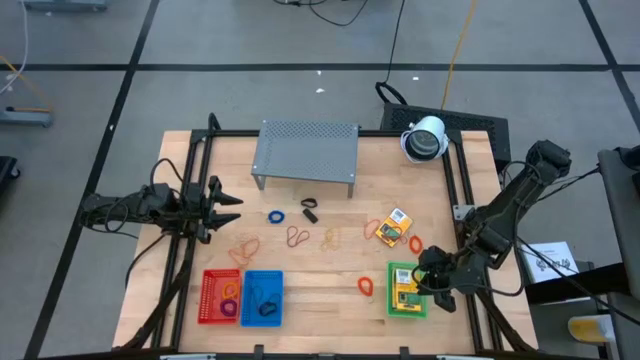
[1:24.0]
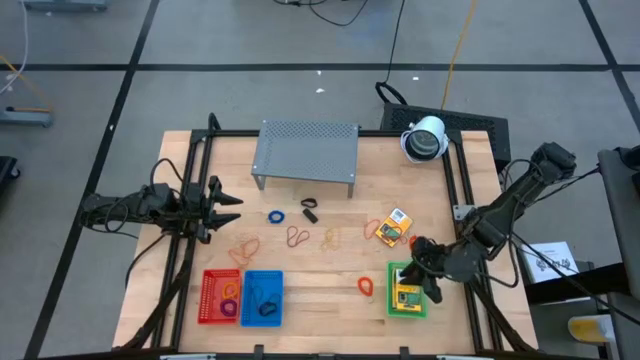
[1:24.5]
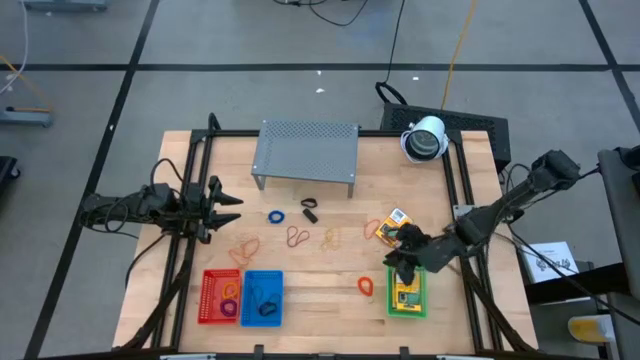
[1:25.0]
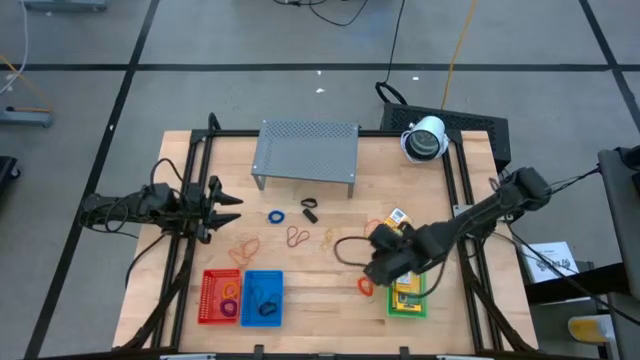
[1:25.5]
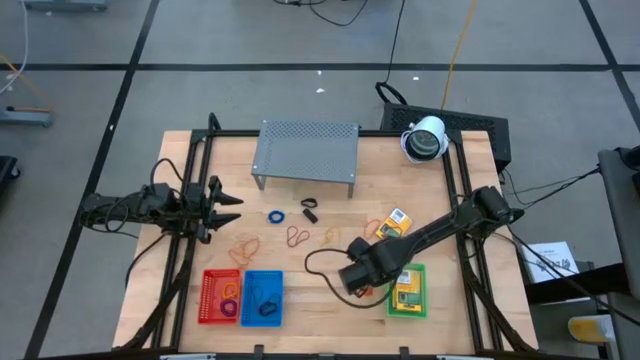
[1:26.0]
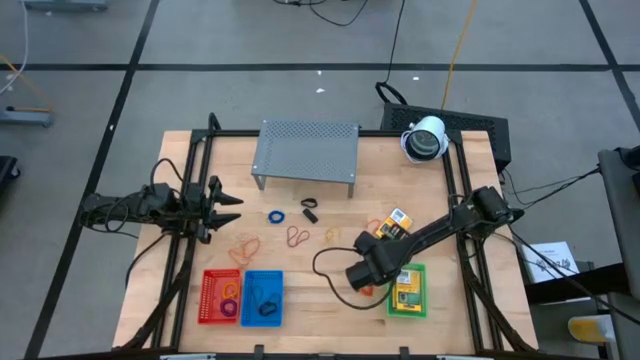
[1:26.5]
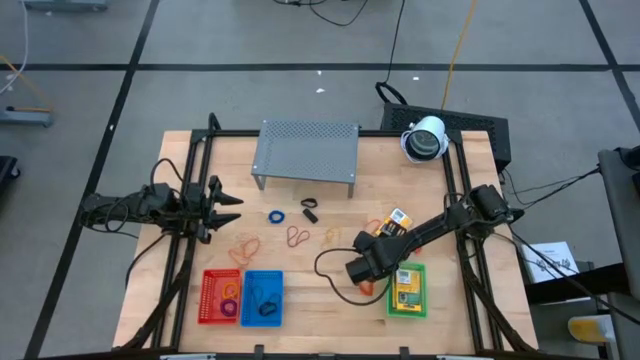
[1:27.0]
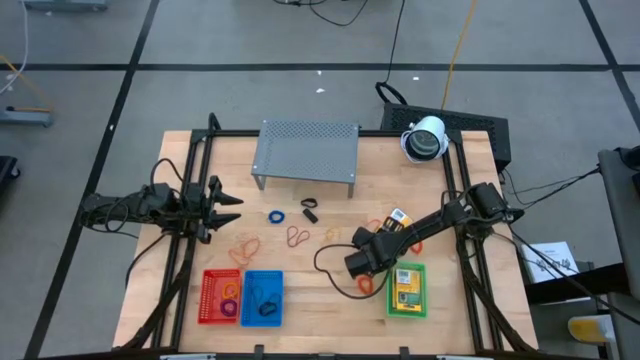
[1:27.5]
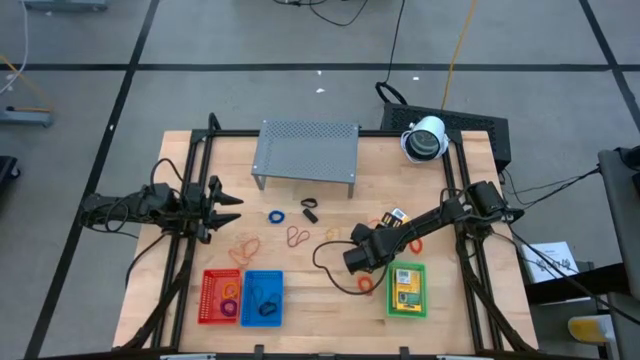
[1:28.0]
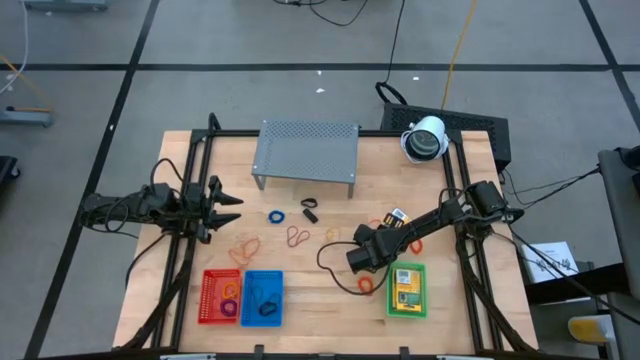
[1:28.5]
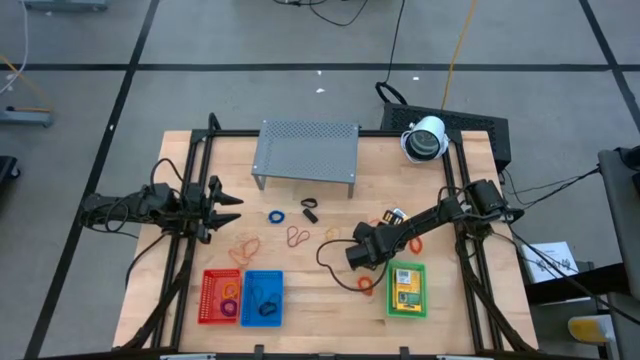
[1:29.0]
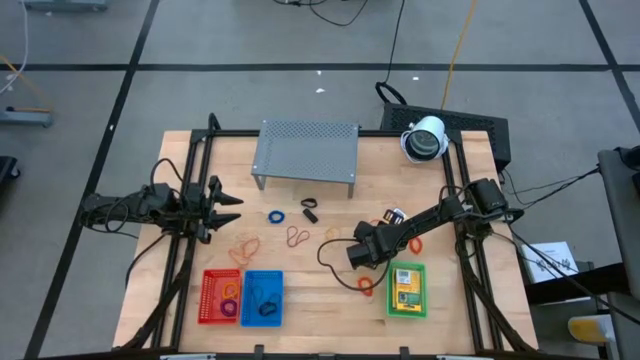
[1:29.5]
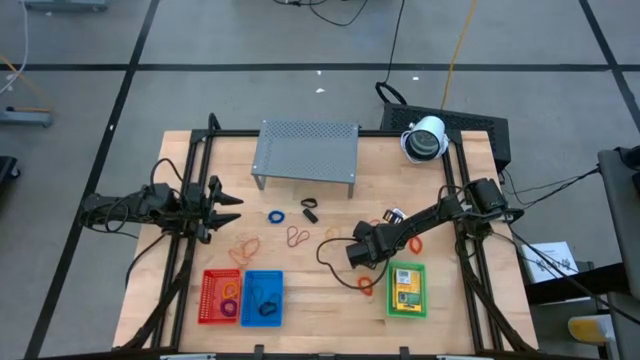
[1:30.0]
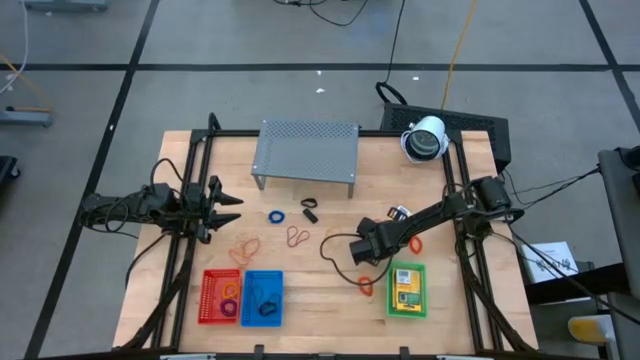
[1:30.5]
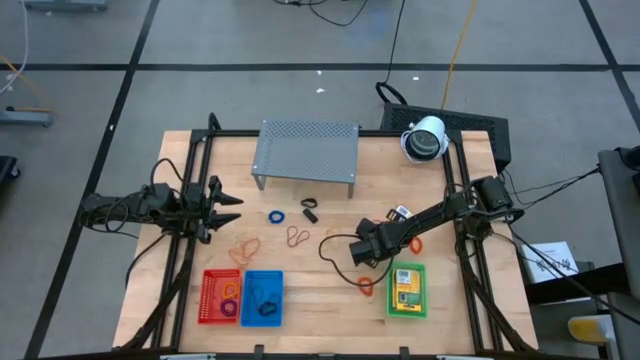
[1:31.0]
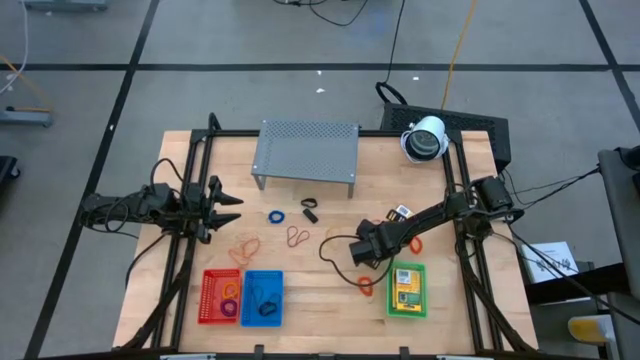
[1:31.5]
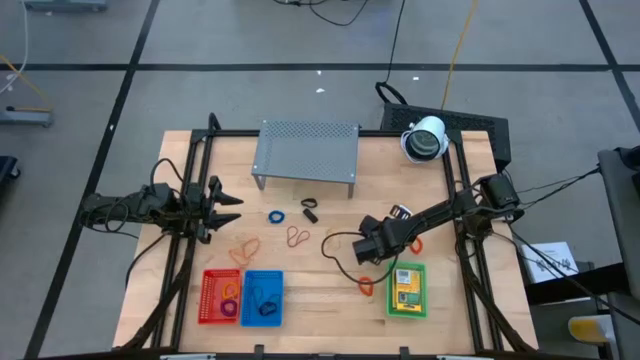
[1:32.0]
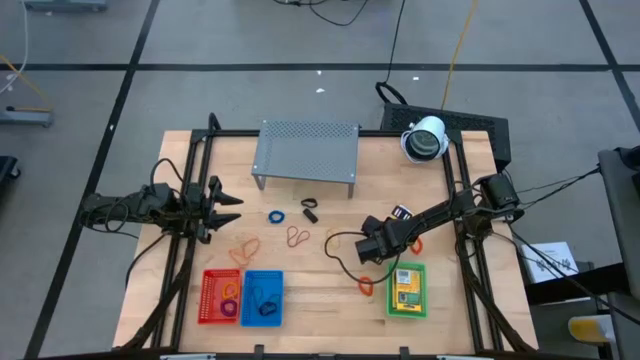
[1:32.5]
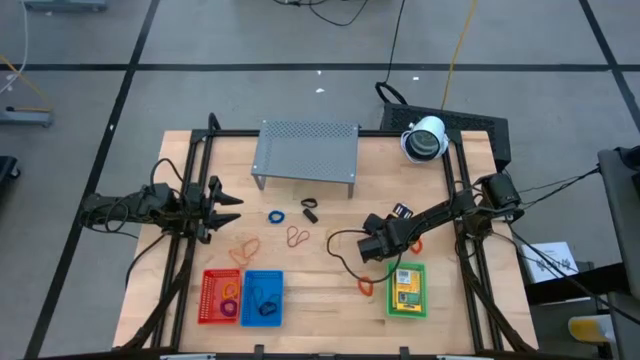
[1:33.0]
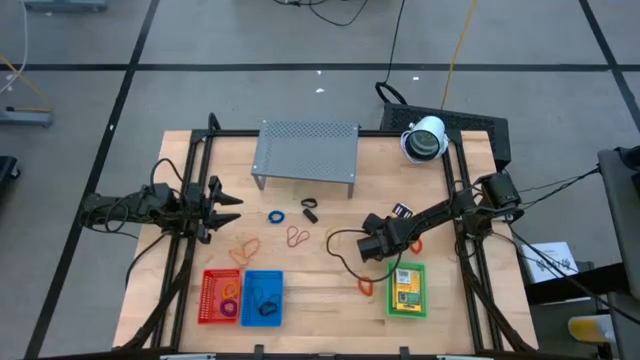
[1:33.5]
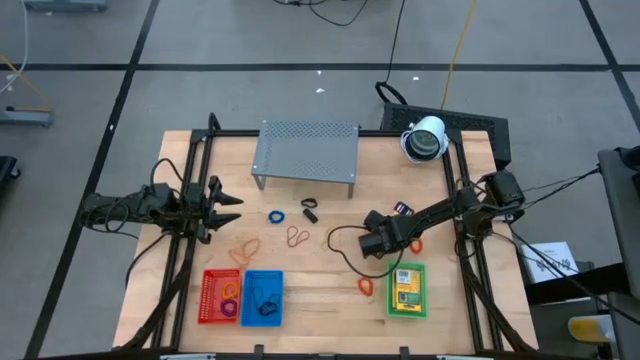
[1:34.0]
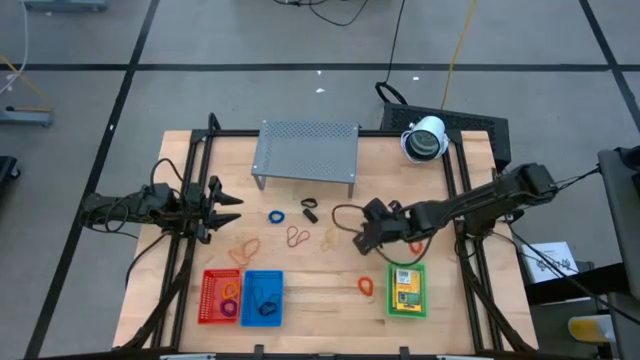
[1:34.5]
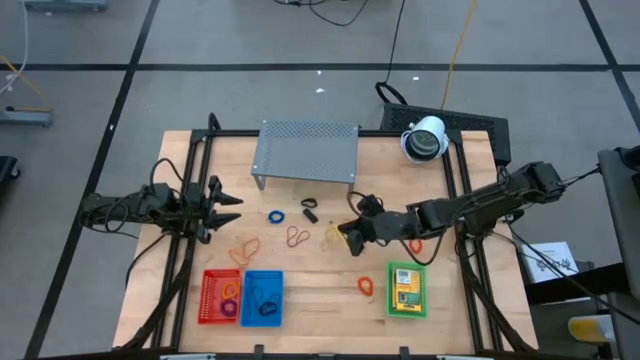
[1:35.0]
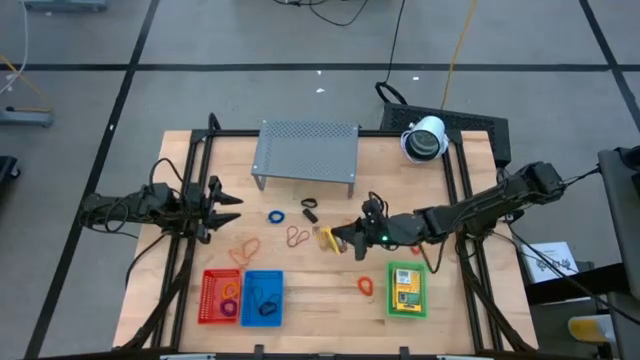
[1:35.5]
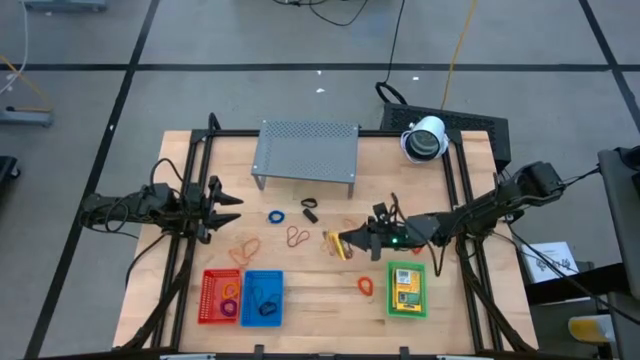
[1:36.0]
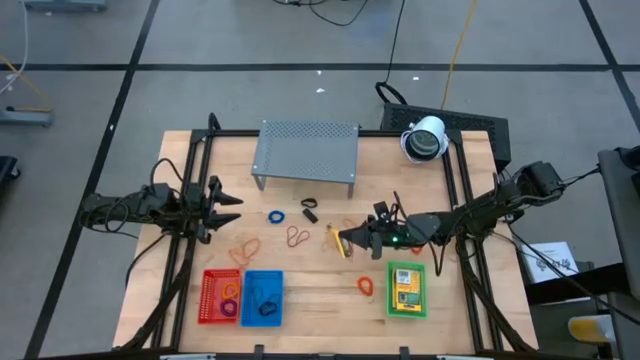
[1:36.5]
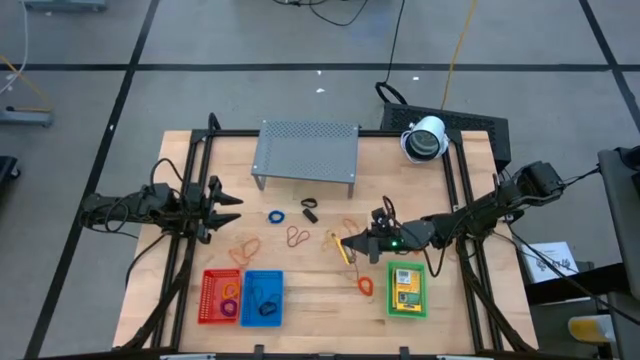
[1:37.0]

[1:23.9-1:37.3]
Task: Pick & Place Office Desk Supplies
Put the yellow crayon box into the green bin

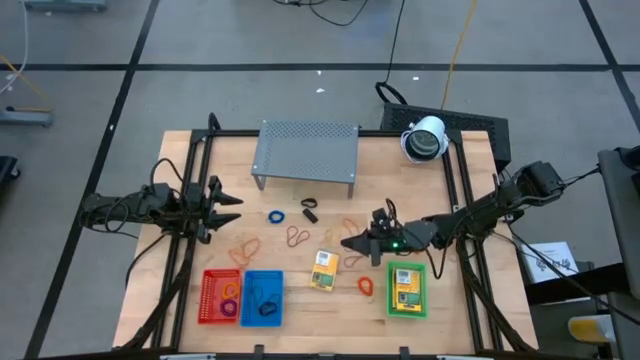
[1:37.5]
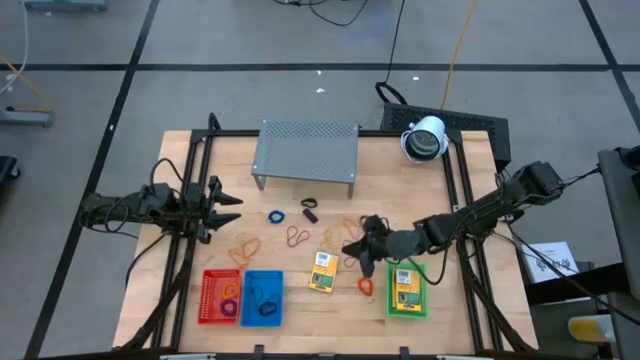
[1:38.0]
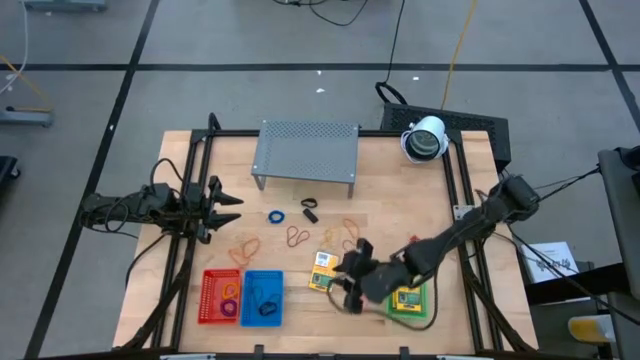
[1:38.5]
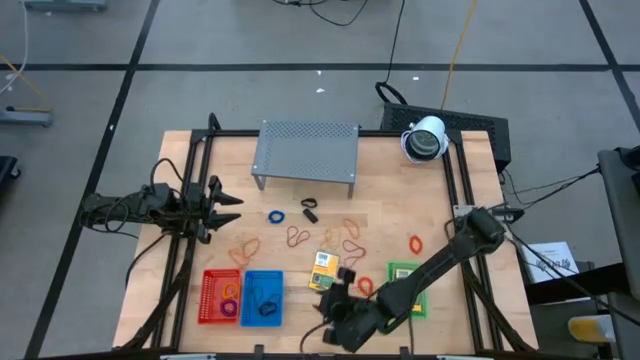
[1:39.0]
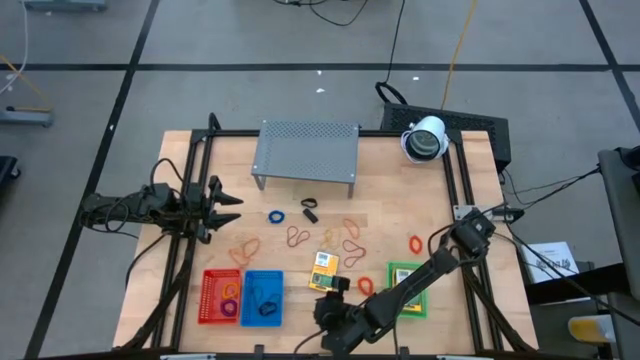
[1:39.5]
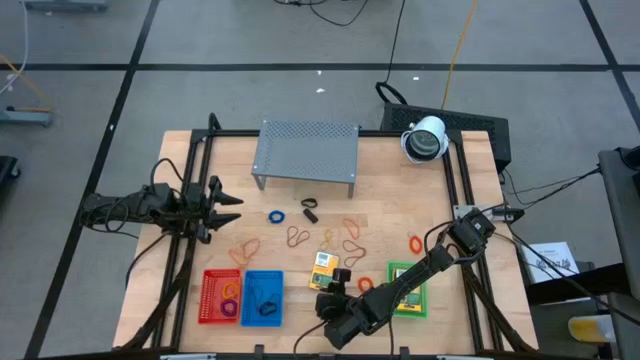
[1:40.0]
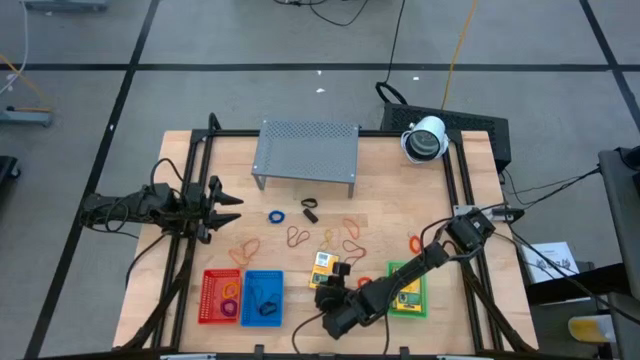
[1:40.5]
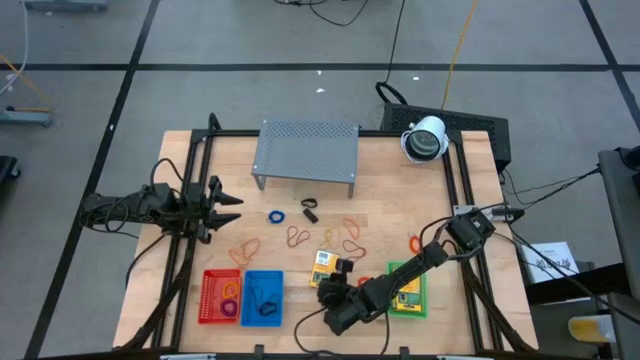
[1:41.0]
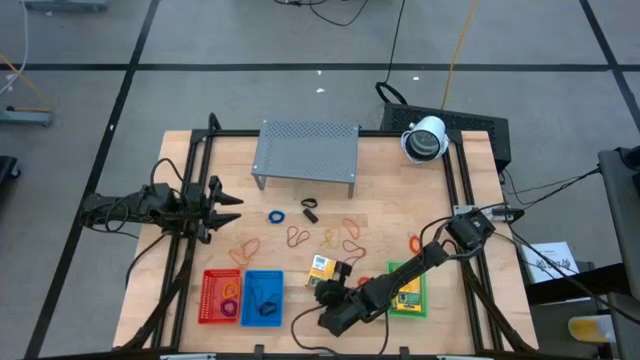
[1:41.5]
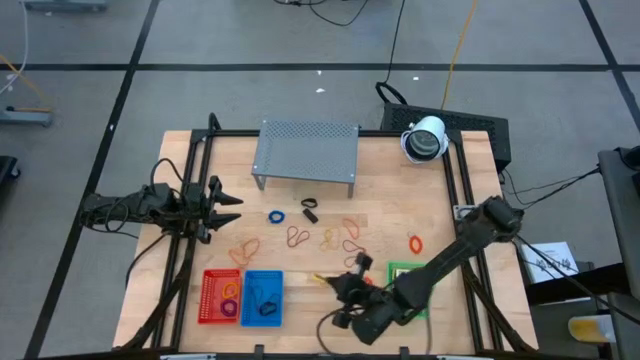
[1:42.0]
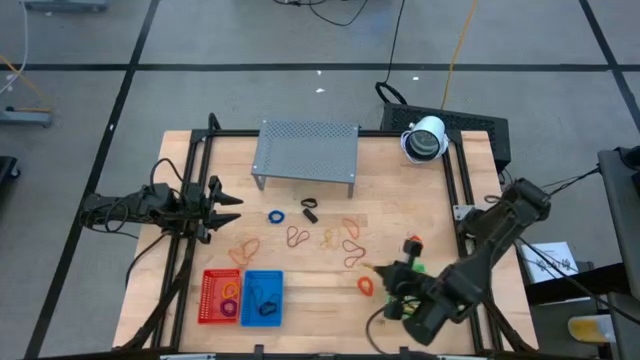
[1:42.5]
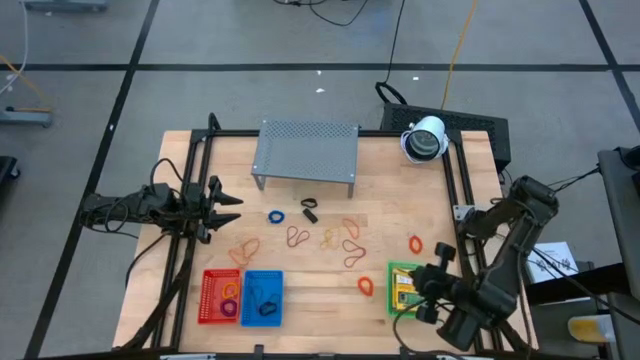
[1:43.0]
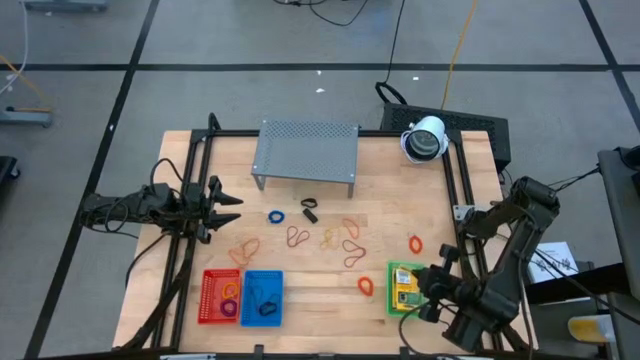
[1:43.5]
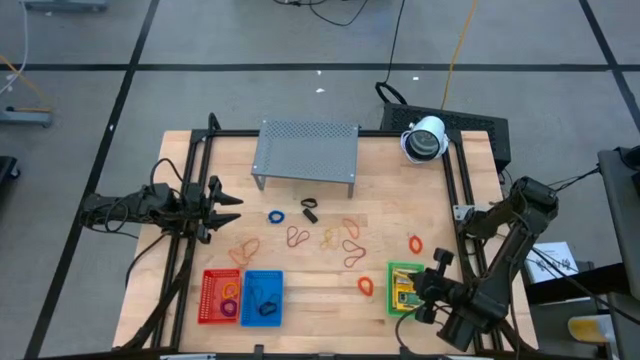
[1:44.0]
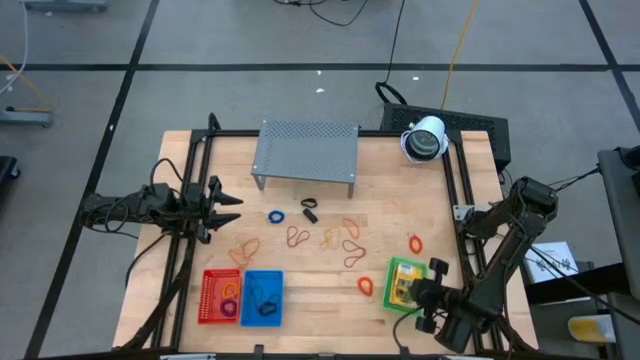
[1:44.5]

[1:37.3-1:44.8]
Put the yellow crayon box into the green bin

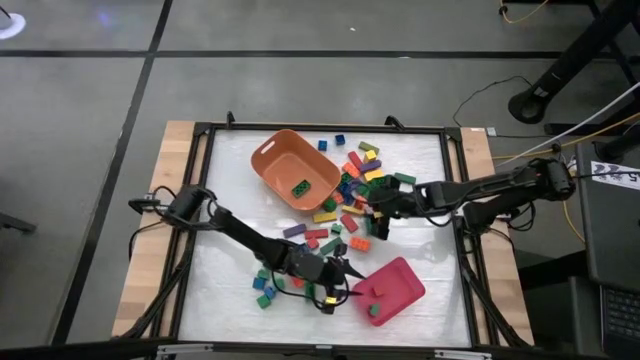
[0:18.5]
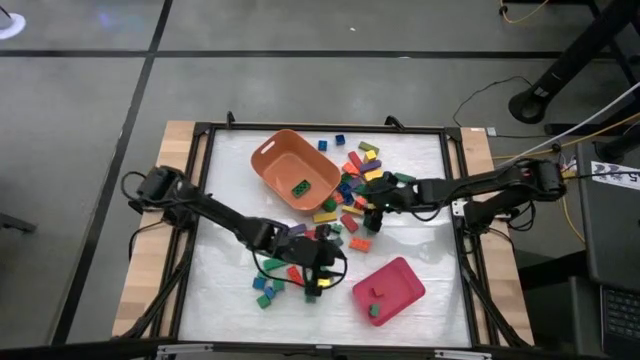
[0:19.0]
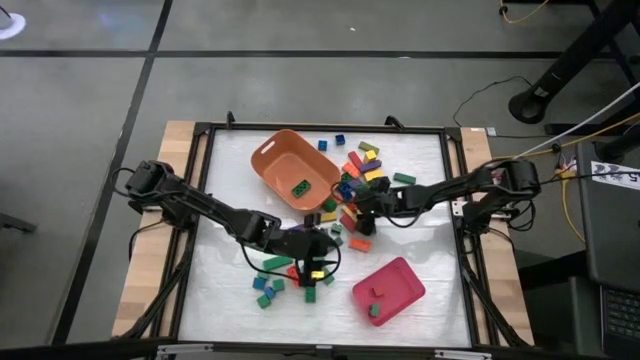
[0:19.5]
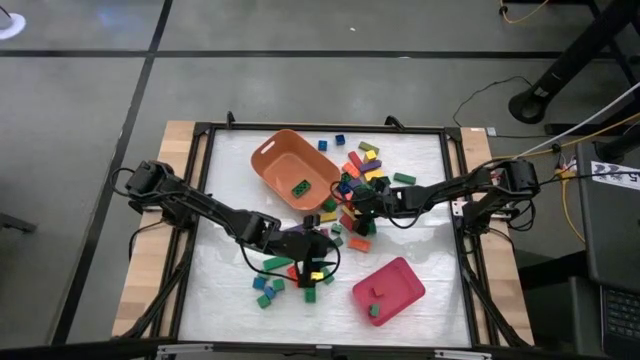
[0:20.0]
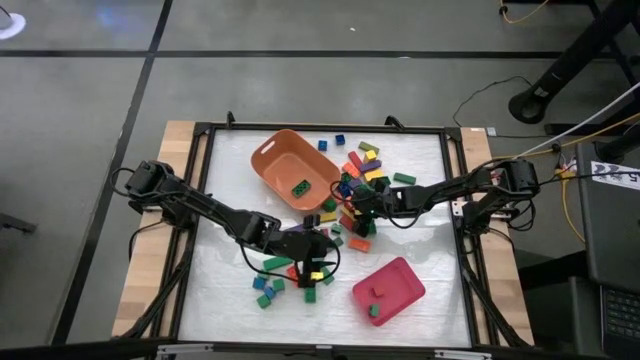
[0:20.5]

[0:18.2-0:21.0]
Task: Sort blocks by size
Put the large orange game piece into the orange bin
